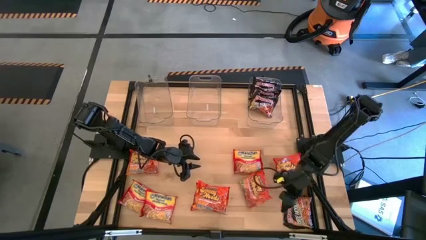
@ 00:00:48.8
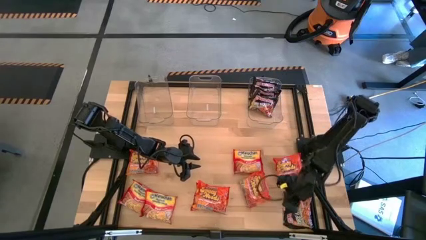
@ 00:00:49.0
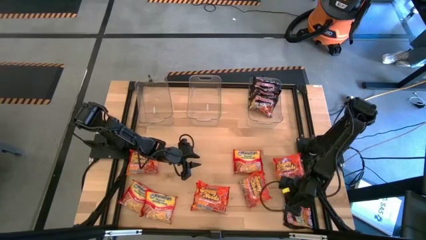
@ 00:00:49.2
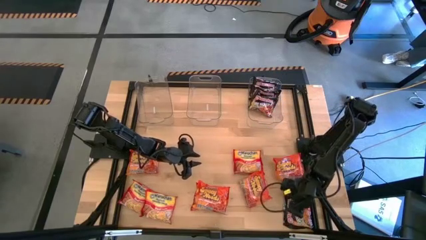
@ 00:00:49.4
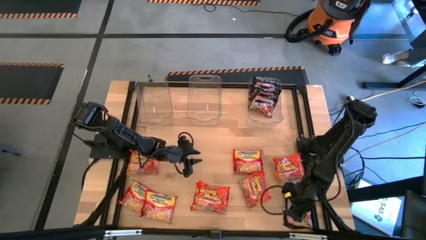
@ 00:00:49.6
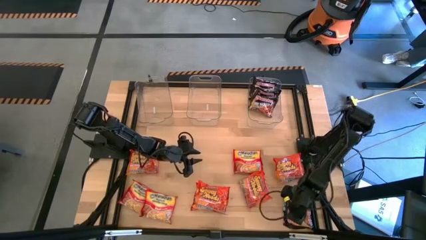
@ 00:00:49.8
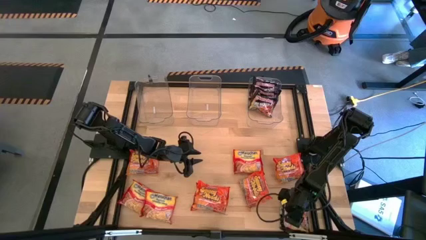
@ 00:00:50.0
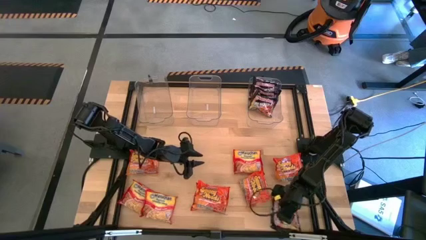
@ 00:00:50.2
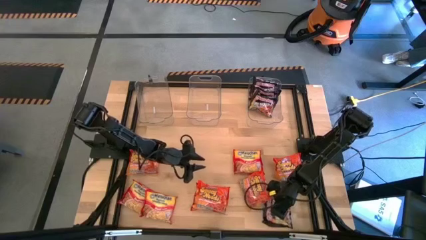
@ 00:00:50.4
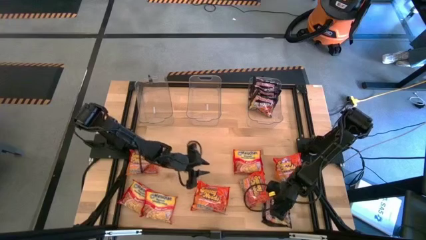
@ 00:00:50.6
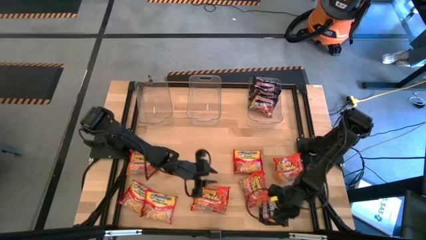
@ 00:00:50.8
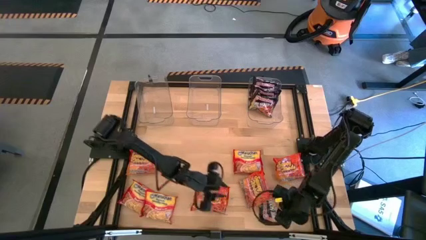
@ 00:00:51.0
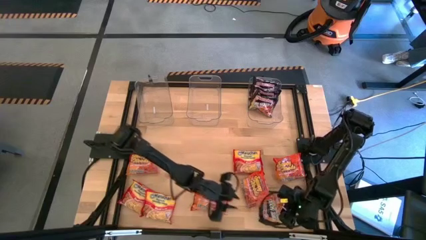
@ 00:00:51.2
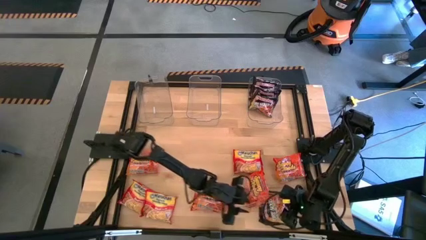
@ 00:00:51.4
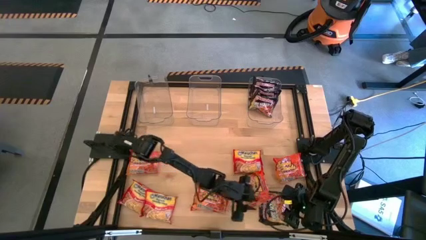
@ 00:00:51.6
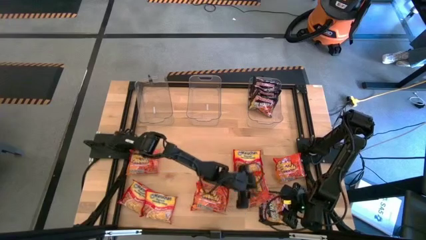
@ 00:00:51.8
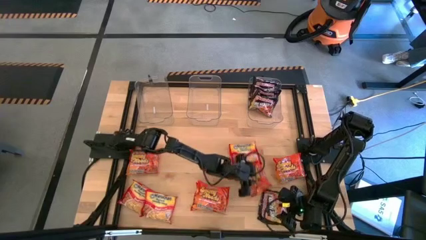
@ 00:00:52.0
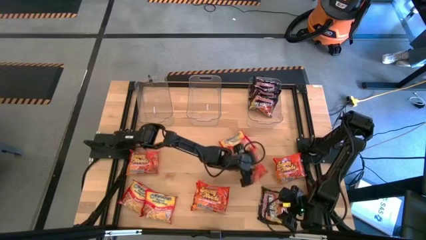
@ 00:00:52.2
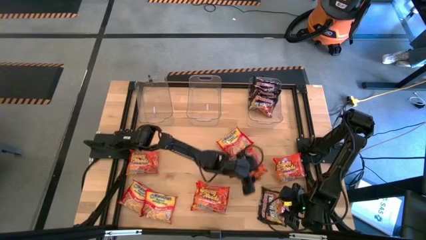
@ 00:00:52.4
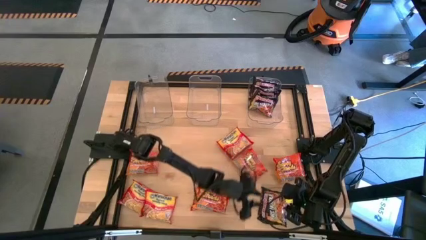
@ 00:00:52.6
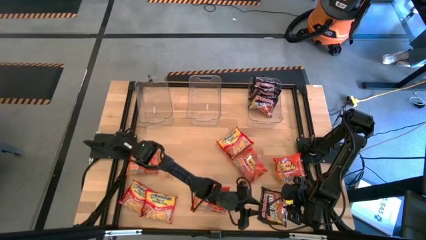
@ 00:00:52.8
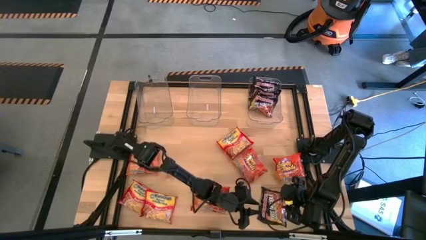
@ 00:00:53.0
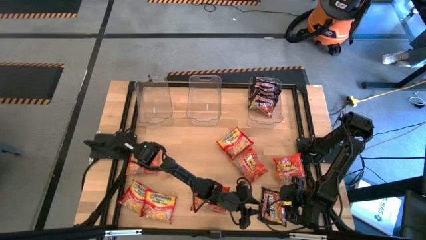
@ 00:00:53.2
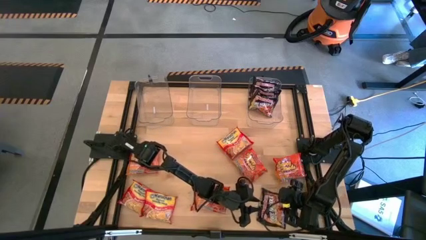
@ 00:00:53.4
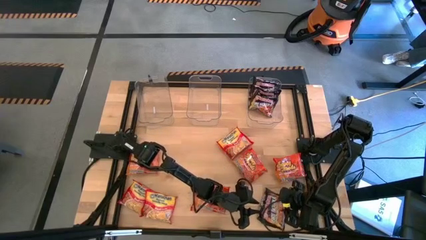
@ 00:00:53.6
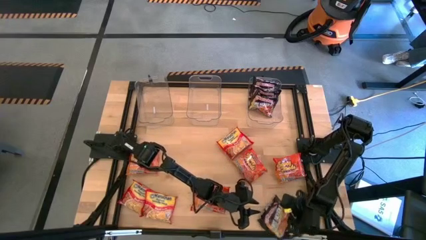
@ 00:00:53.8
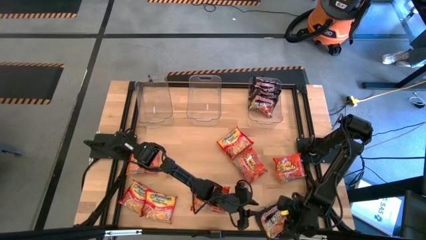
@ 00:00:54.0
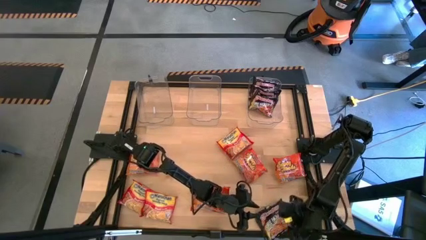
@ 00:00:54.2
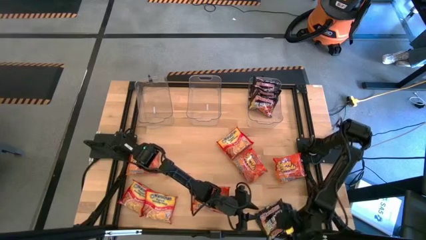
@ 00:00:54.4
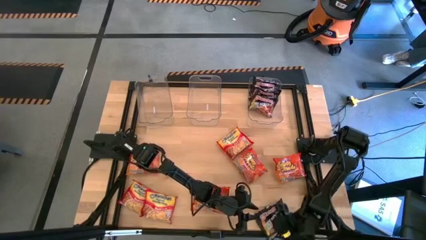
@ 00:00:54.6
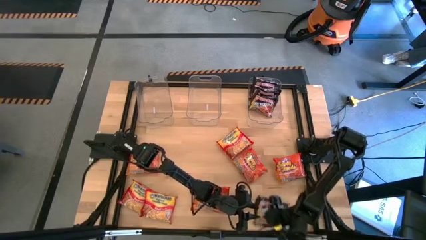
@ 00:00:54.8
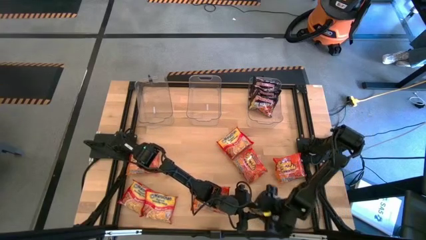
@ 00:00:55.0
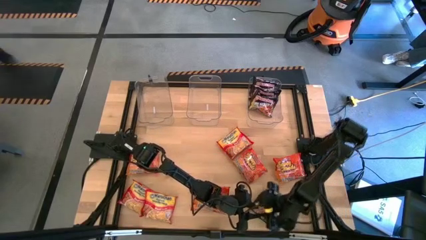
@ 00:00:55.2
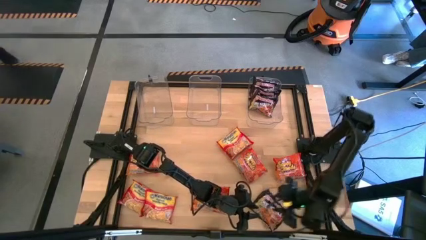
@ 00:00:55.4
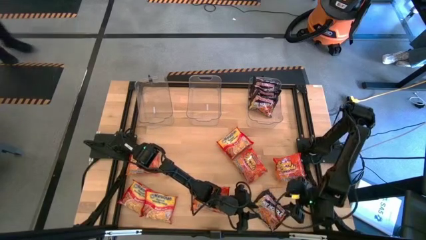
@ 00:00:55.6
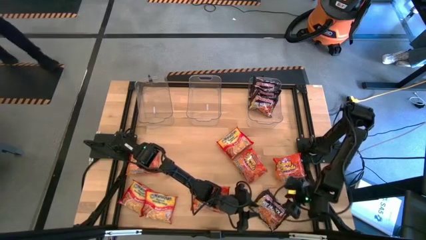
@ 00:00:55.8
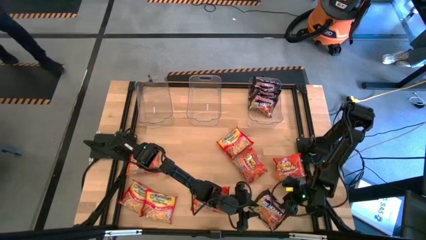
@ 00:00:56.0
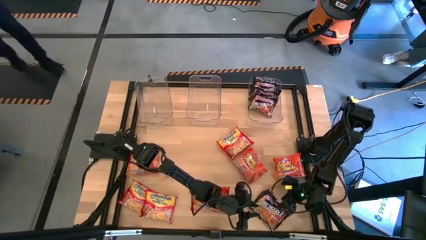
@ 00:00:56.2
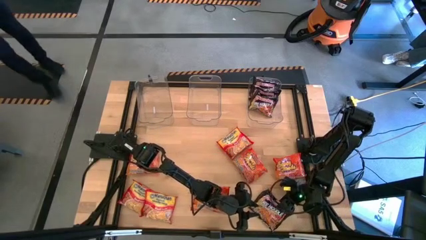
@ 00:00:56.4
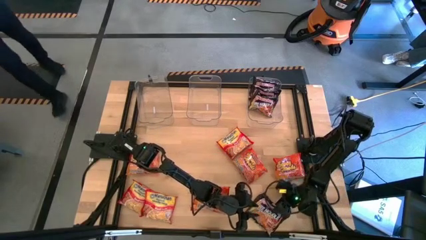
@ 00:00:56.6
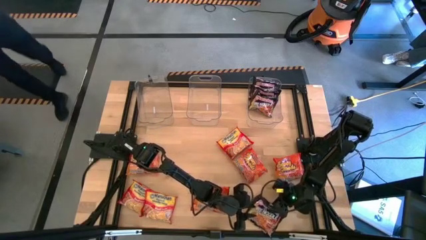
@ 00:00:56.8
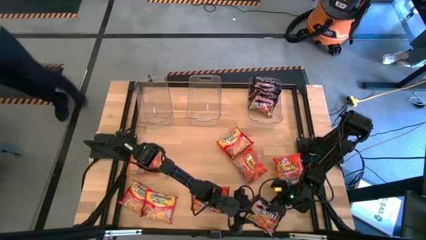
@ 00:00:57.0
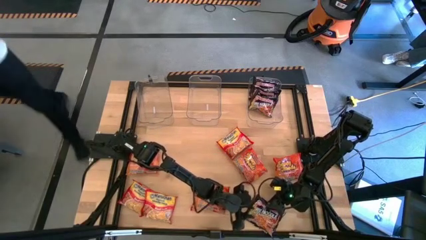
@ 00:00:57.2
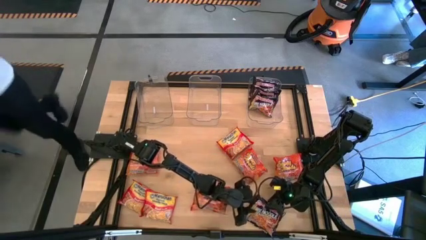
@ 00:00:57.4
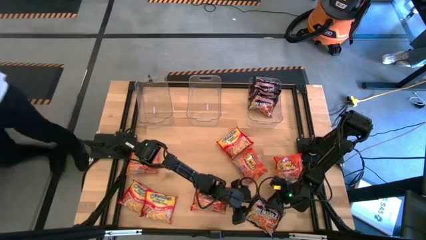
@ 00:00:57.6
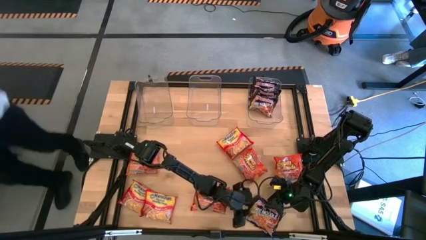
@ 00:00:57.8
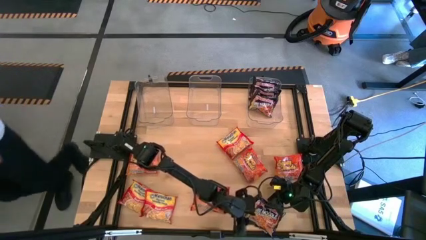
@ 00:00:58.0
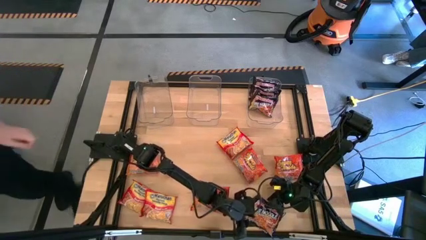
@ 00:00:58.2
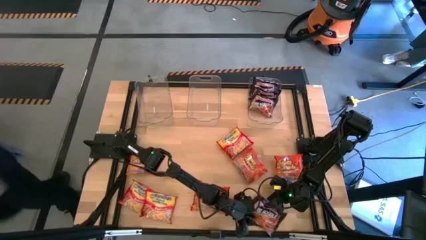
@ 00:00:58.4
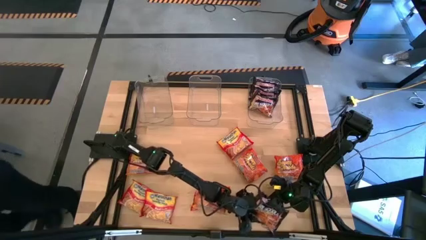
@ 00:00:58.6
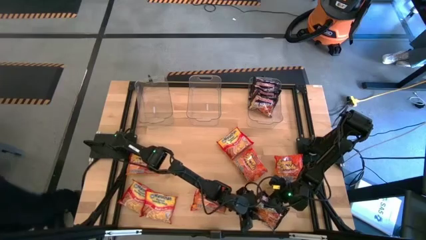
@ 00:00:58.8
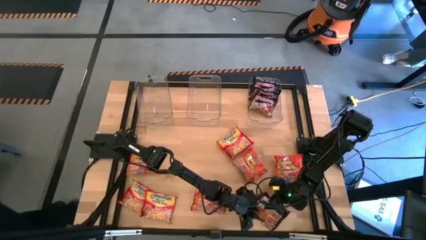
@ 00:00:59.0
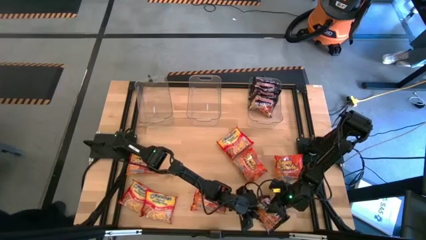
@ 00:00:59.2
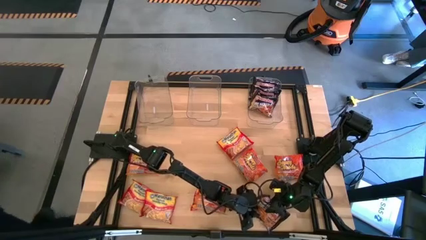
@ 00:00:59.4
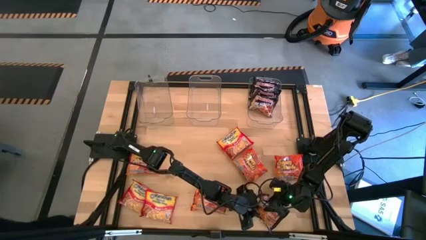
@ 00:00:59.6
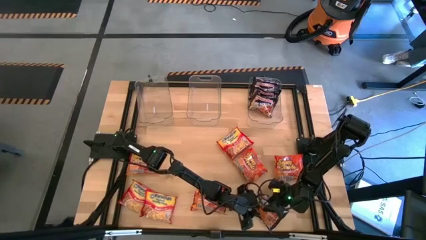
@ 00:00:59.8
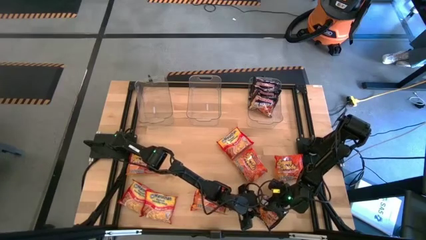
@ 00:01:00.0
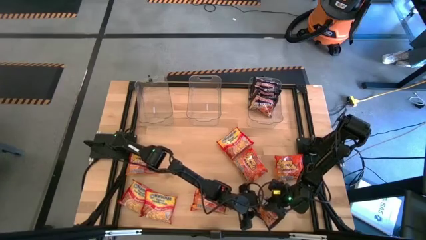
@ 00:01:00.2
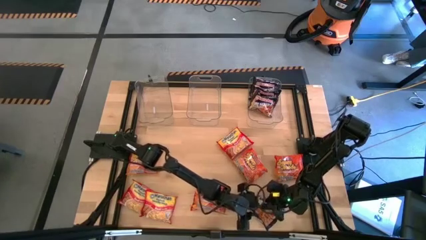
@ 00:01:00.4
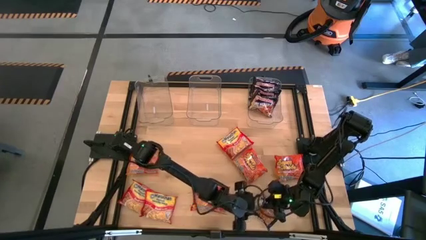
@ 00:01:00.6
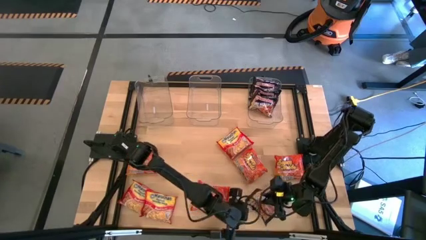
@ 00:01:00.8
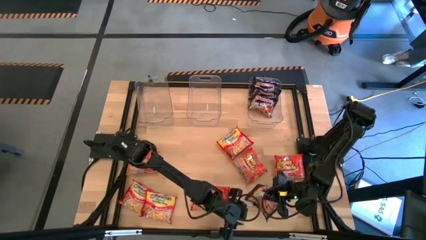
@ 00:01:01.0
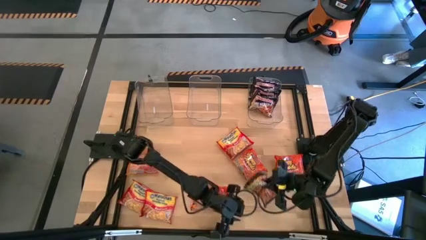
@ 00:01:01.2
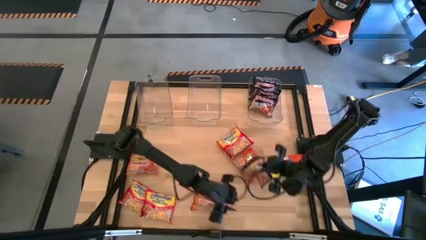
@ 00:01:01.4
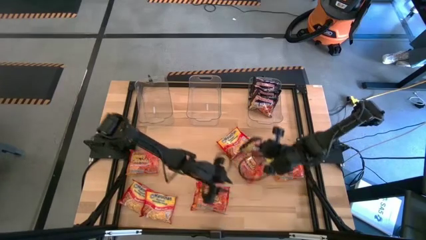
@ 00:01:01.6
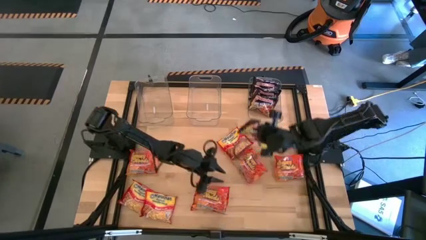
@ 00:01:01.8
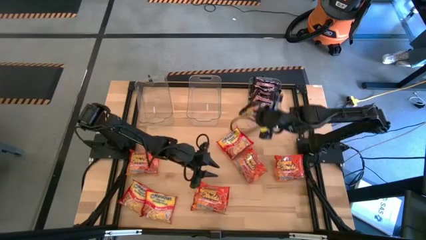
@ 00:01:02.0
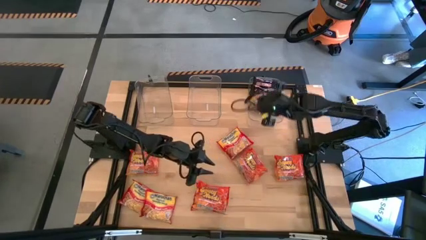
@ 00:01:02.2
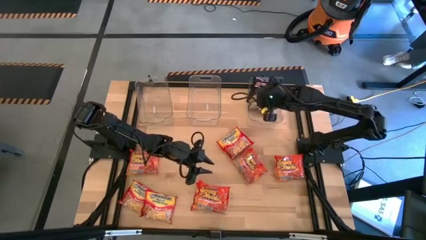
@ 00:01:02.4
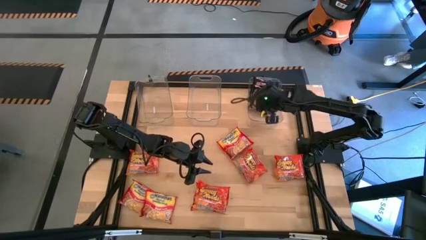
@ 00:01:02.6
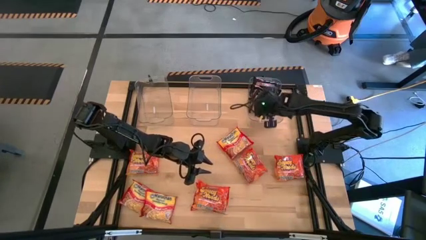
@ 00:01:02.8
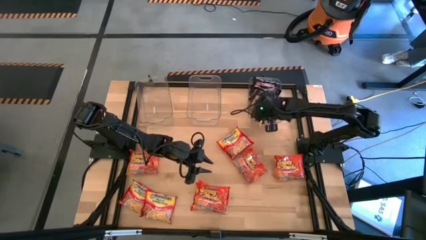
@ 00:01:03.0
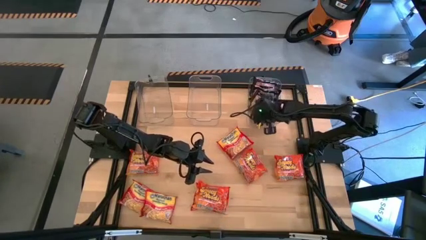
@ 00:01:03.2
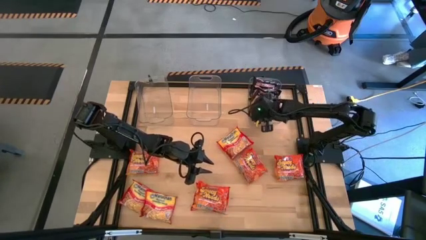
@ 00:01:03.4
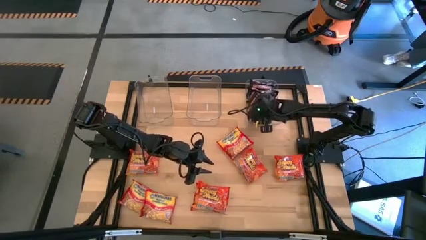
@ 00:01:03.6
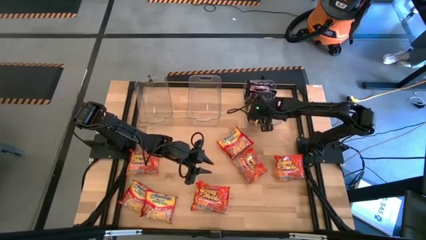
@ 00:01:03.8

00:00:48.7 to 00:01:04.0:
Task: Sort Maruchan noodles
Put the black noodle pack into the right transparent bin
